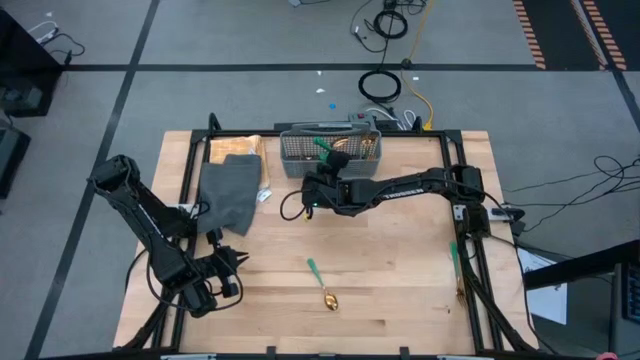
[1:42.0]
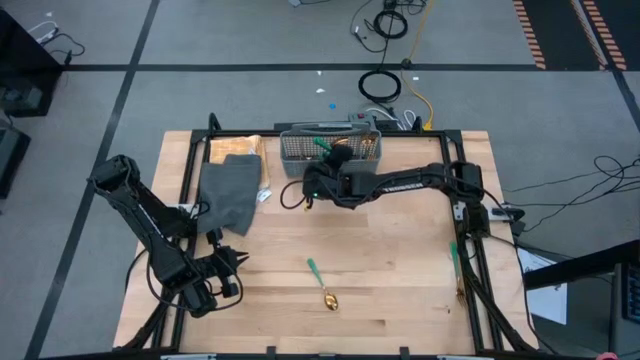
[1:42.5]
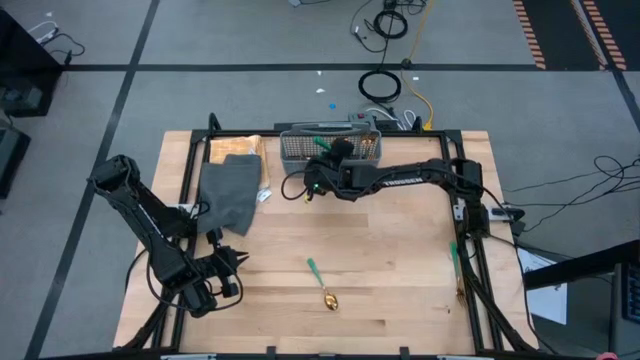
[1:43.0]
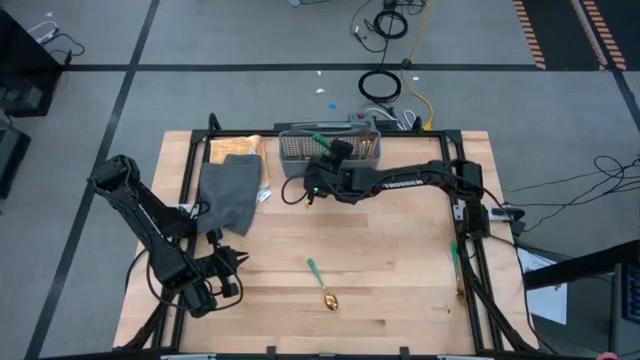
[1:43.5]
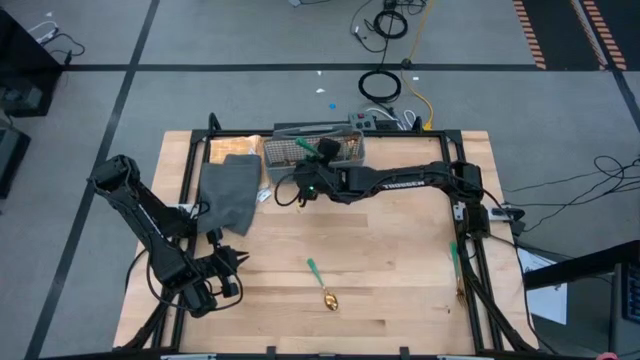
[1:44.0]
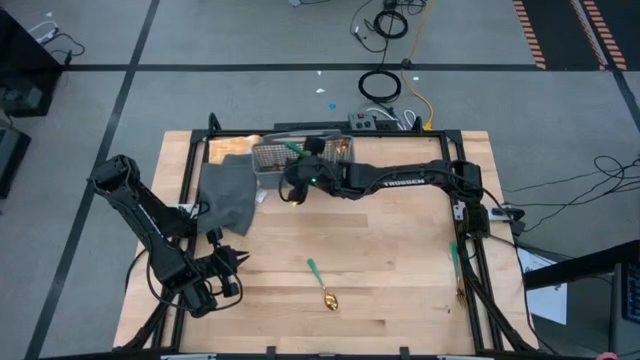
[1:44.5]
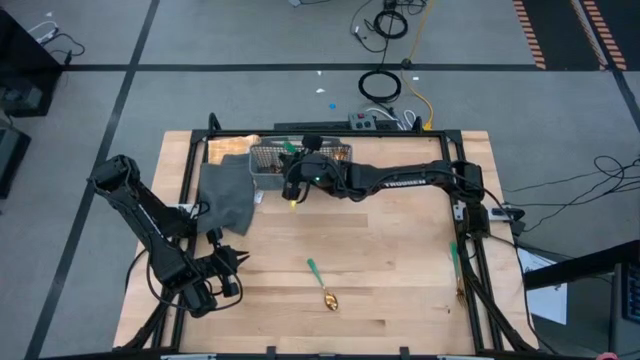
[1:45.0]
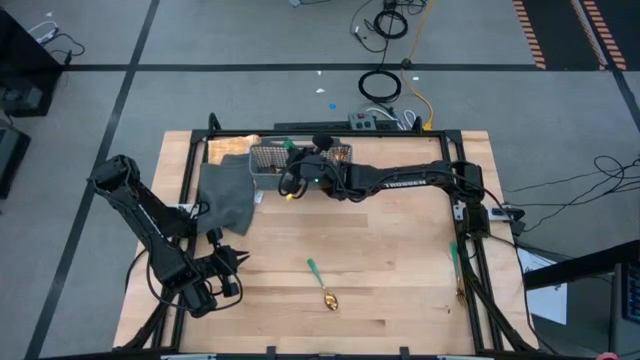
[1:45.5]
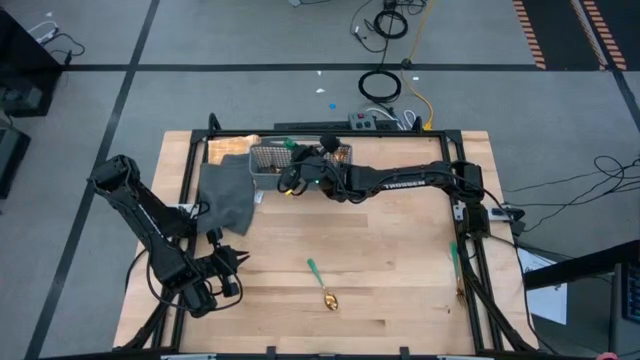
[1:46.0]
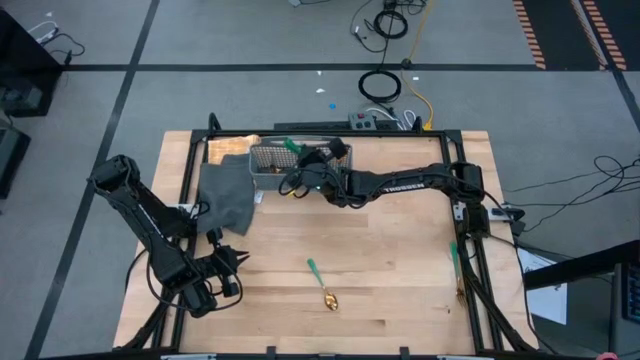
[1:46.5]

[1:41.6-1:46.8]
Task: Sort silverware
Adjust the green knife into the gray silverware basket

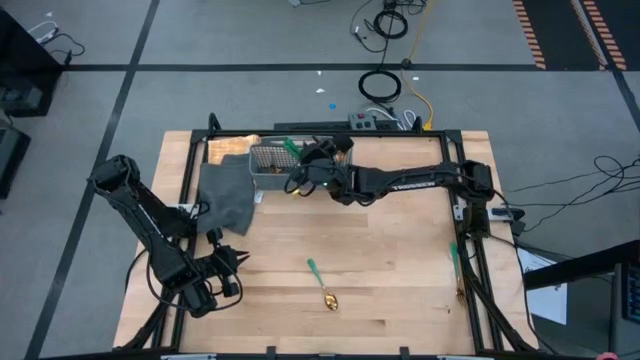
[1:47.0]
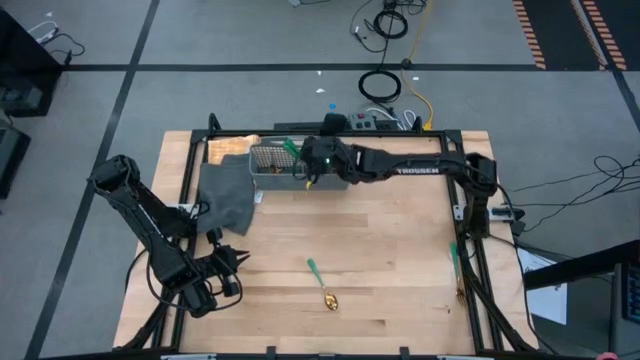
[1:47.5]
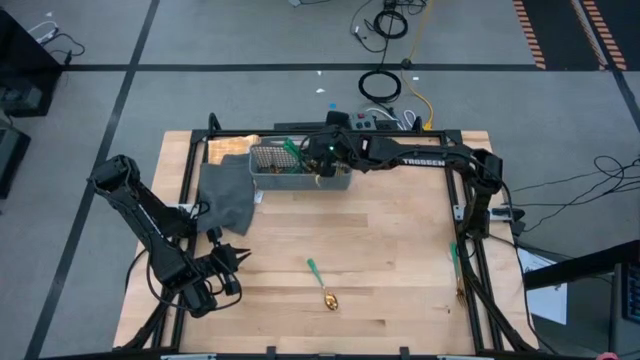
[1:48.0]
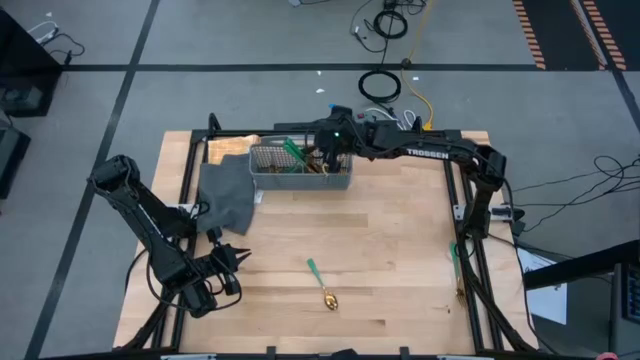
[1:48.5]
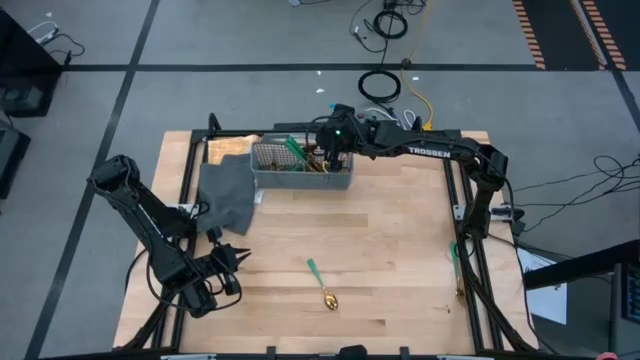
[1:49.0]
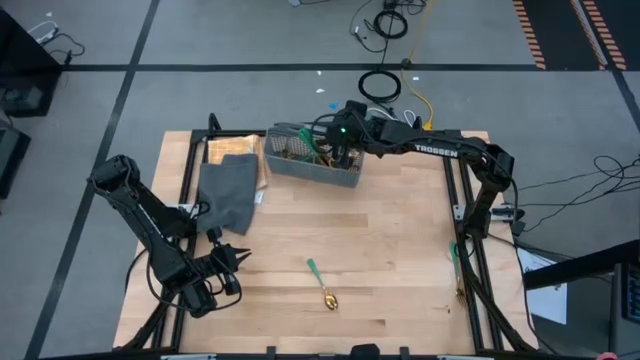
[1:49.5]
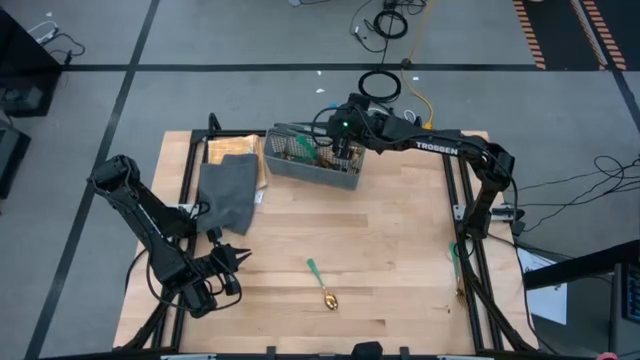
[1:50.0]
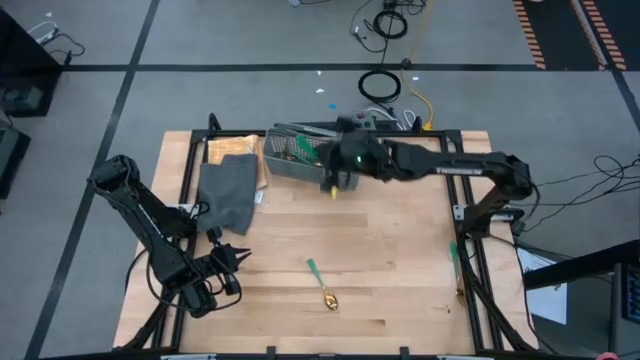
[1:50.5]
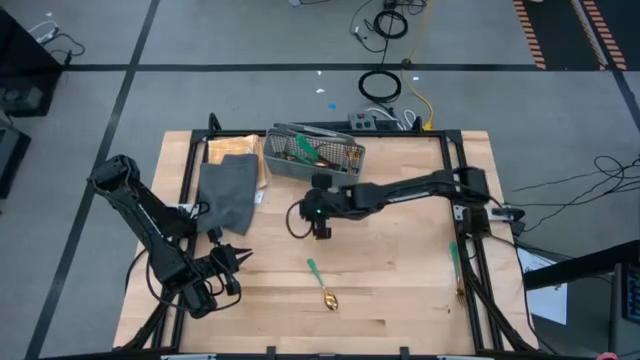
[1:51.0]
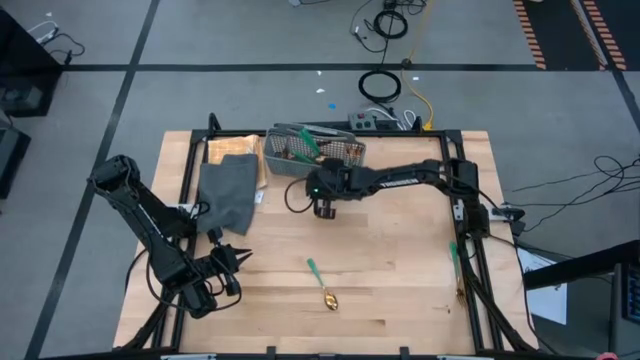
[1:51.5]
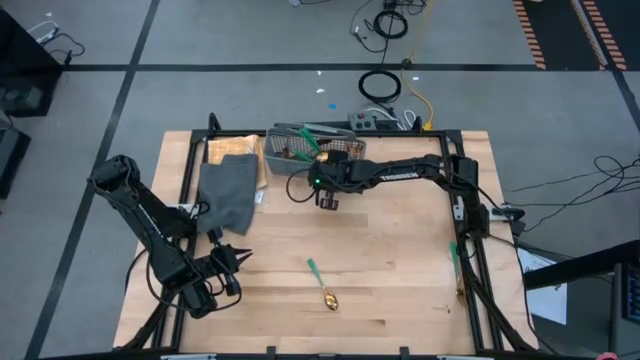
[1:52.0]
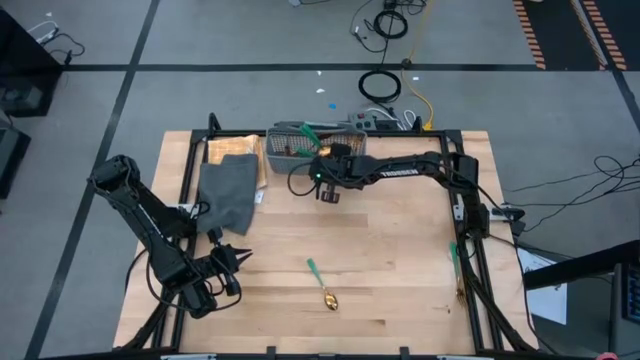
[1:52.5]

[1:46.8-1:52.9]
Adjust the gray silverware basket on the table

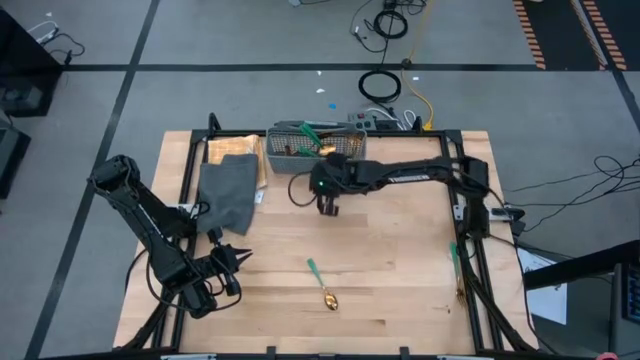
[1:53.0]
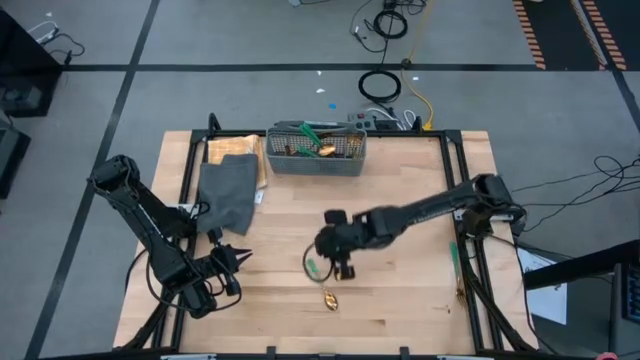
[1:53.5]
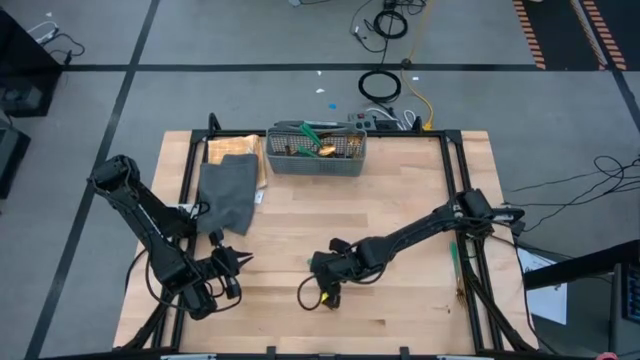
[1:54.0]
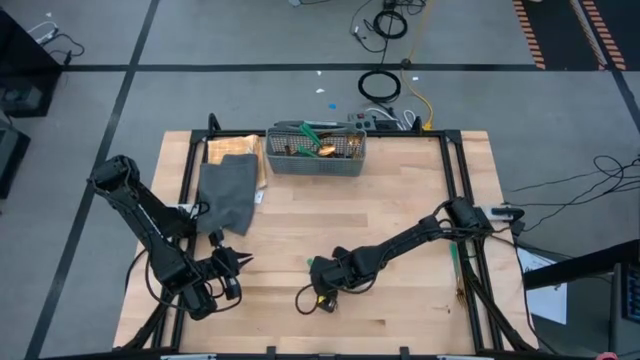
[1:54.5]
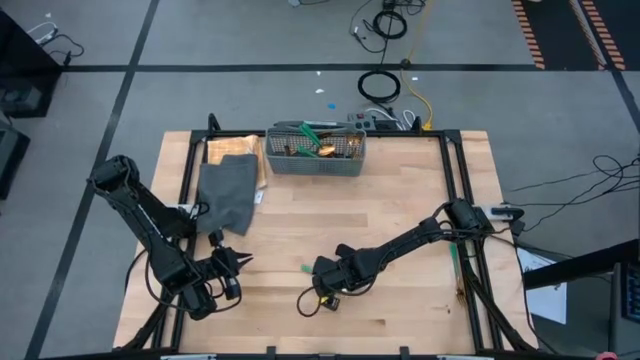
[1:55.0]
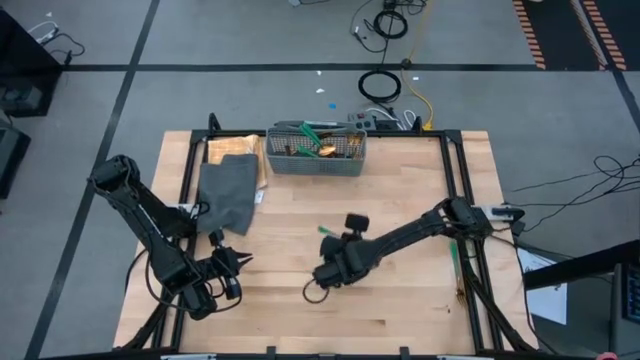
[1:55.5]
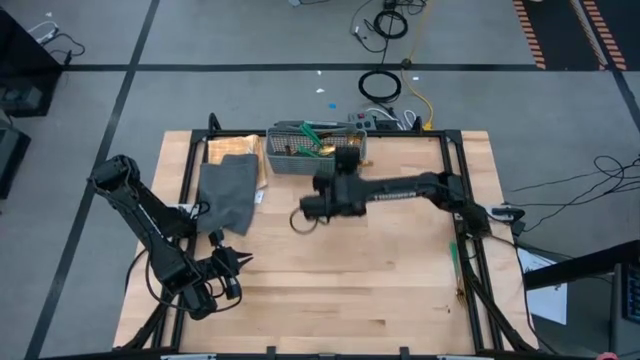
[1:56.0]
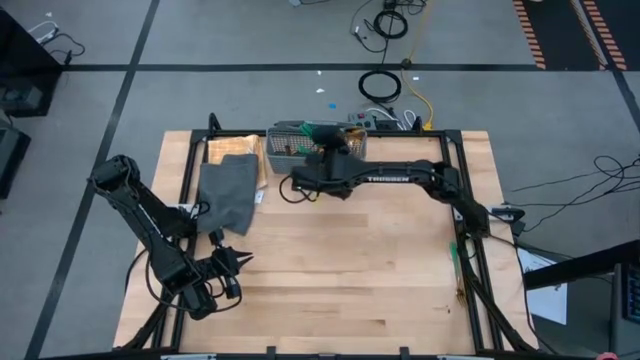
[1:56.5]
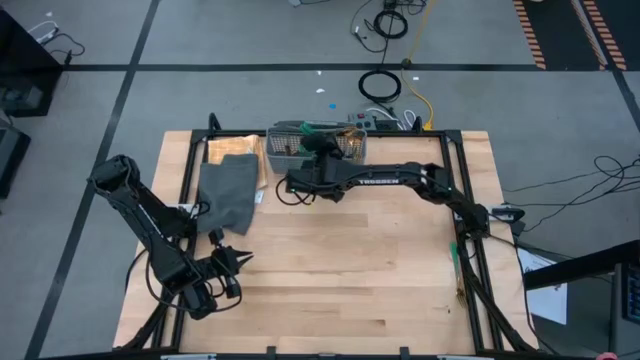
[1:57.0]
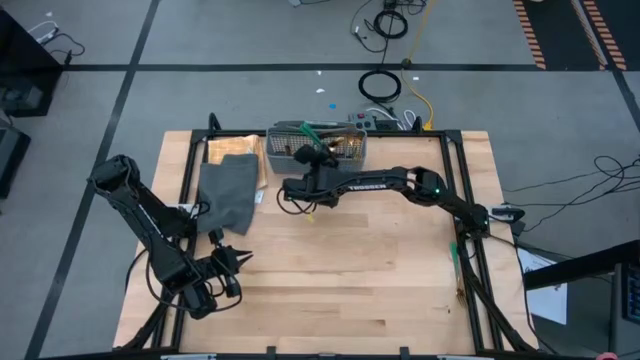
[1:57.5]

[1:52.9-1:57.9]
Put the green spoon into the gray silverware basket

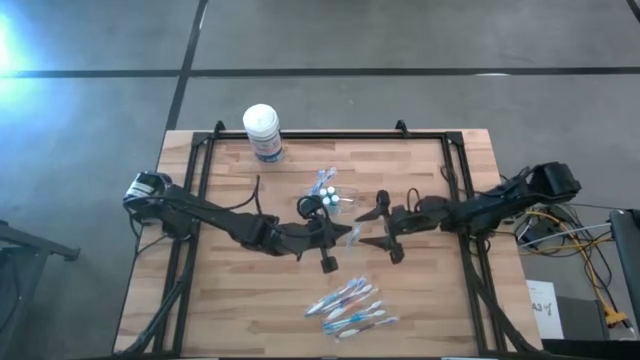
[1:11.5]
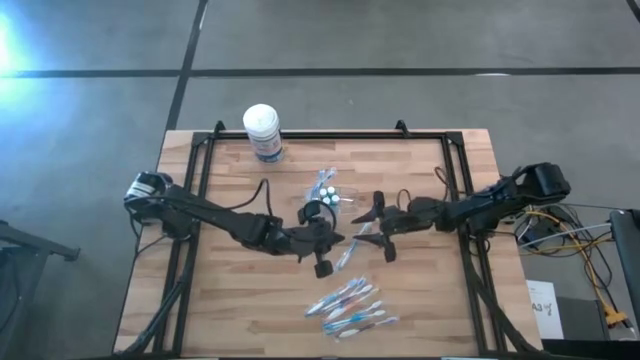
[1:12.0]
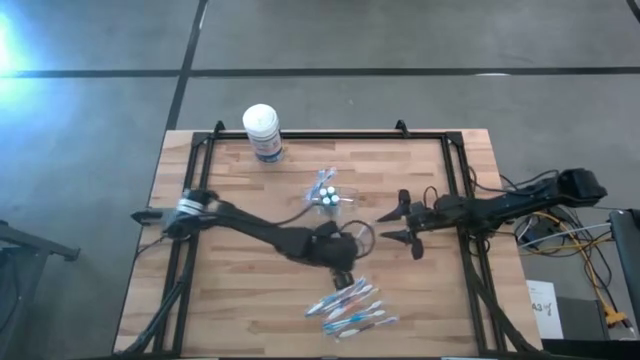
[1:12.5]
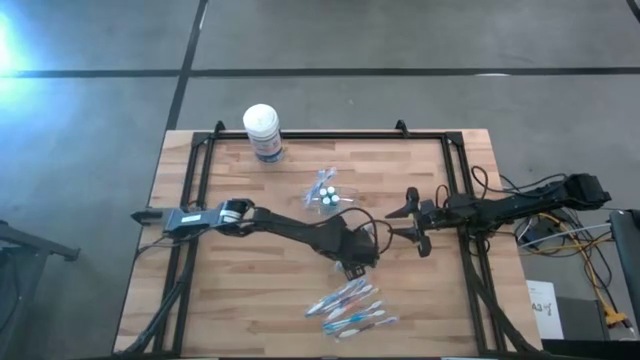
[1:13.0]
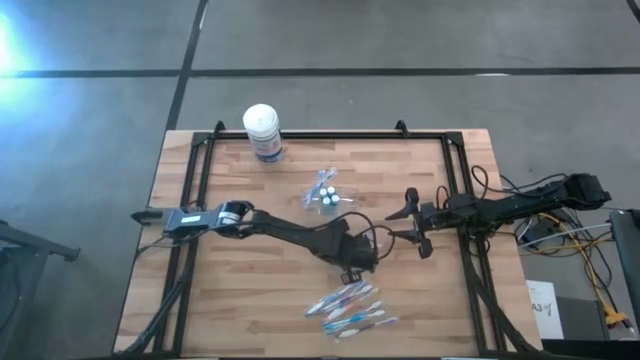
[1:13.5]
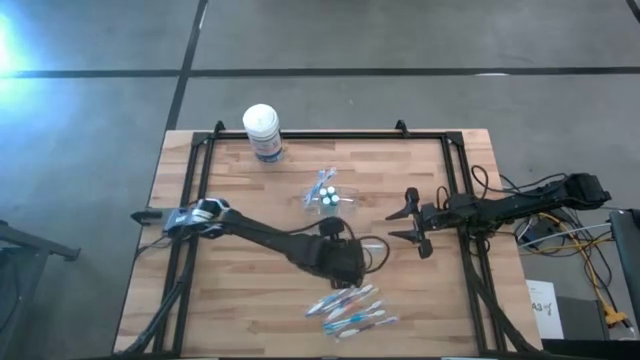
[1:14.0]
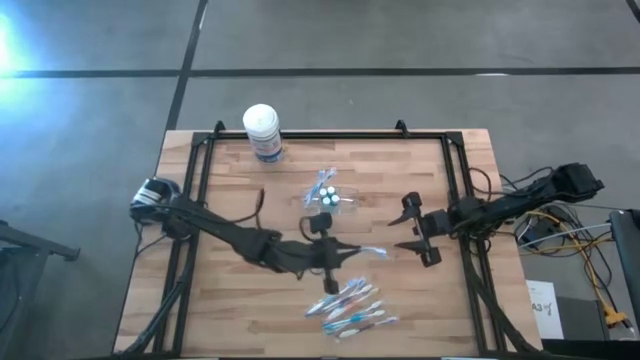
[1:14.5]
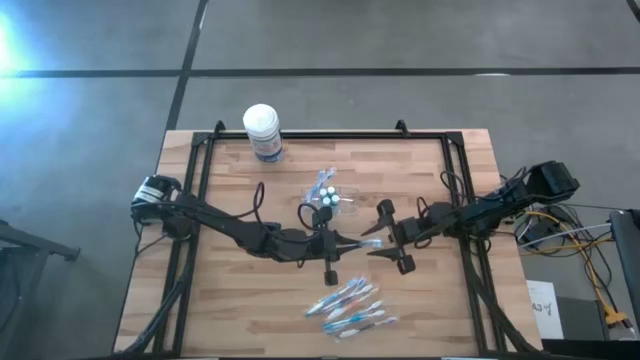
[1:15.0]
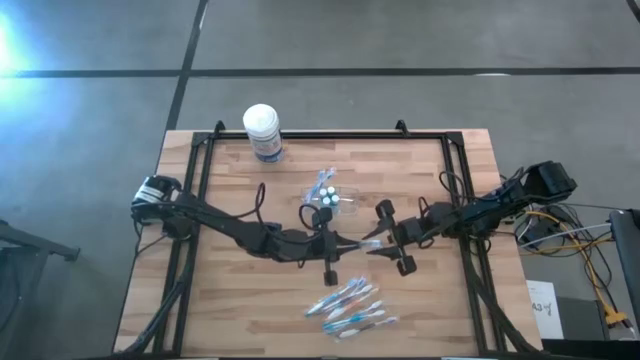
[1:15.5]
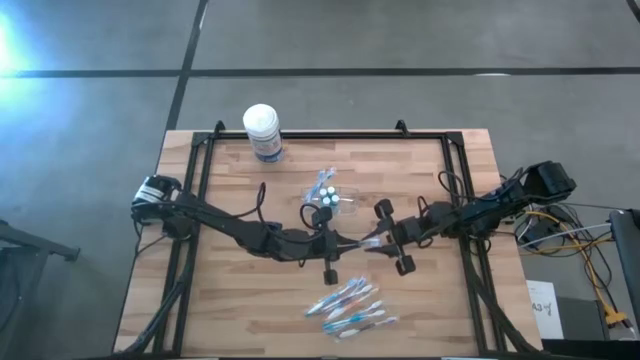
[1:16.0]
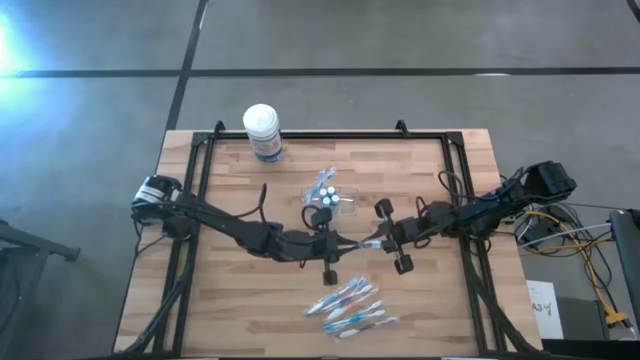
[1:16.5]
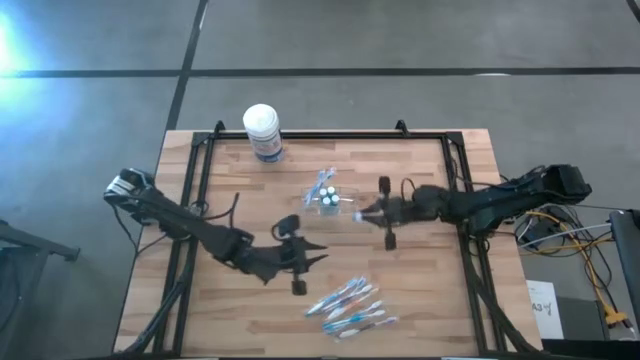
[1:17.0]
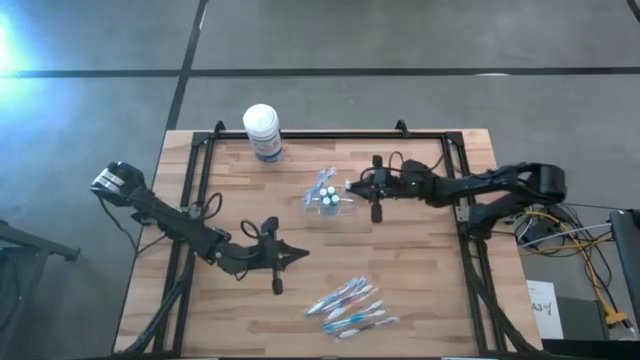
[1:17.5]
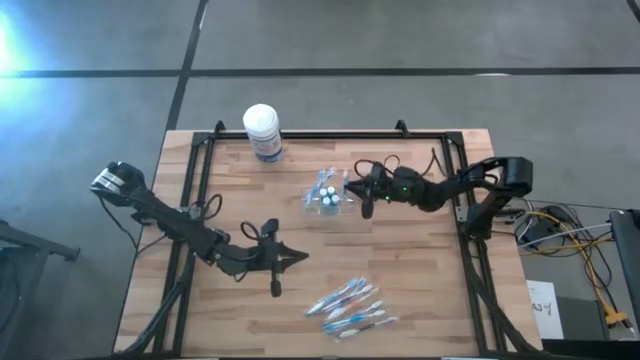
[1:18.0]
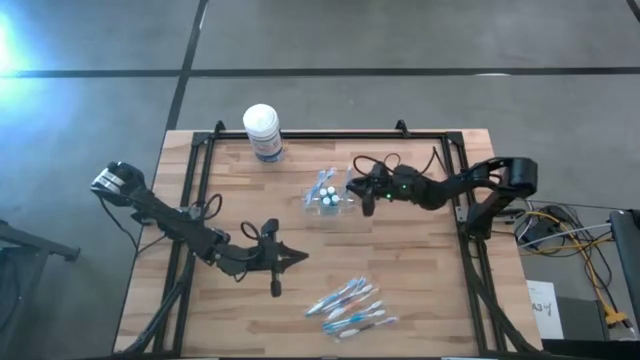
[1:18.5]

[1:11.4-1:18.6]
Task: Pick & Place toothbrushing station
Put the blue toothbrush into the transparent organizer
